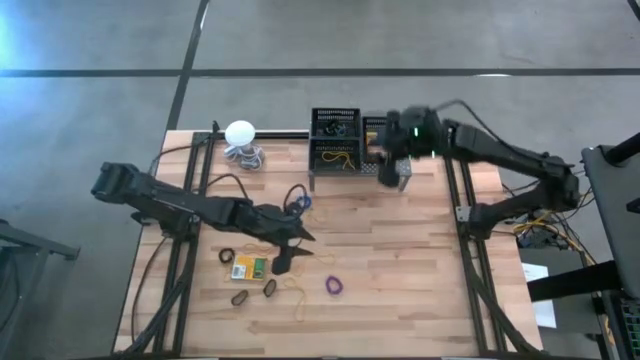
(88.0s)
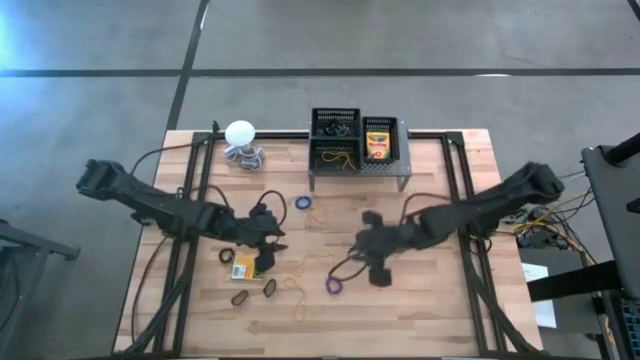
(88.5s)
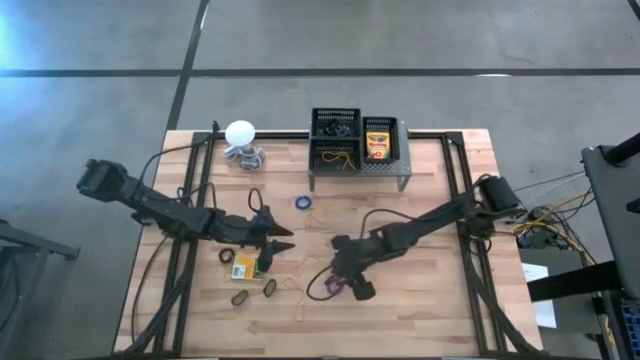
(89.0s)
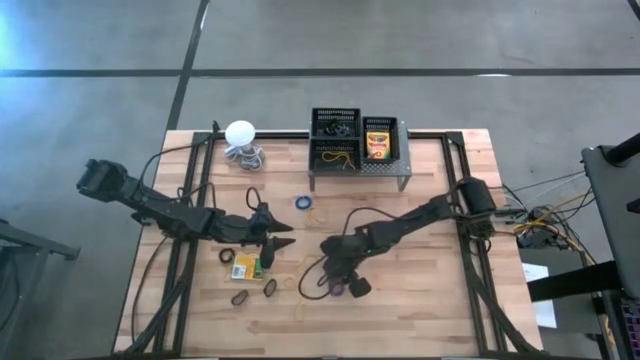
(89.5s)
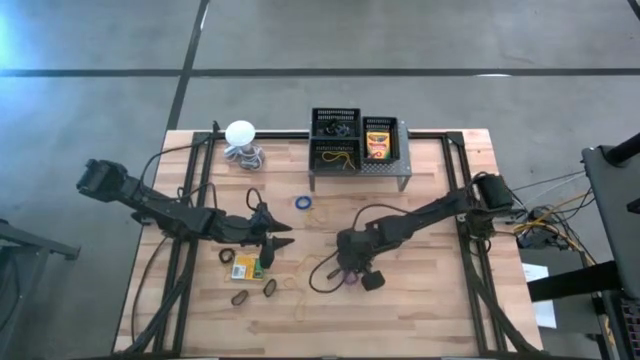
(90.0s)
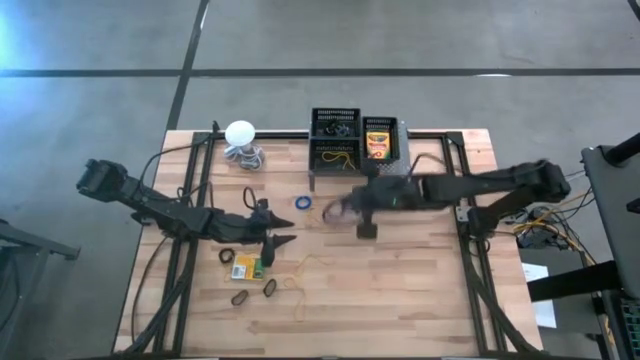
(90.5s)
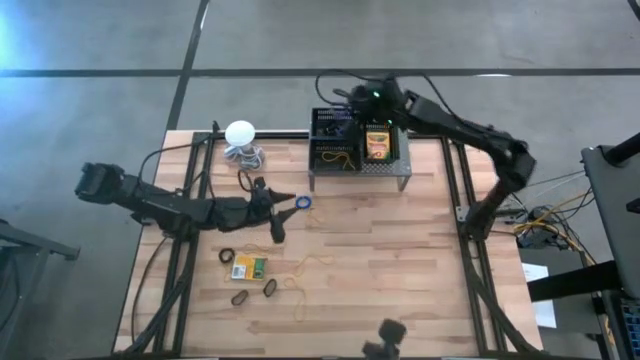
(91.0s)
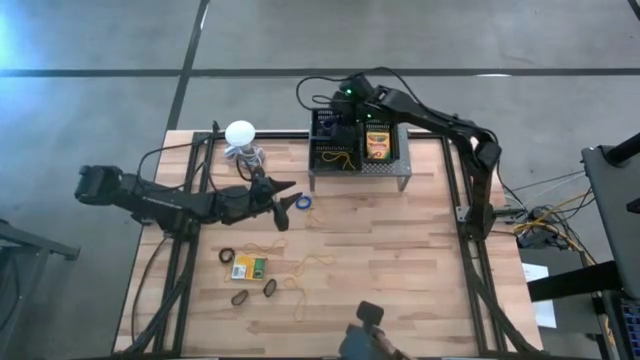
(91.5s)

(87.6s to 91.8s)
Task: Pick & Place Office Desk Supplies
Put the purple spring keychain into the top left black bin

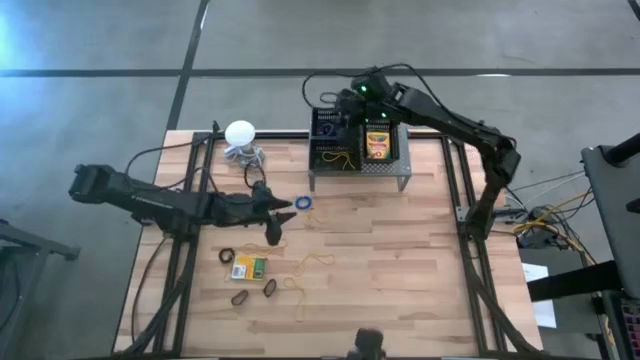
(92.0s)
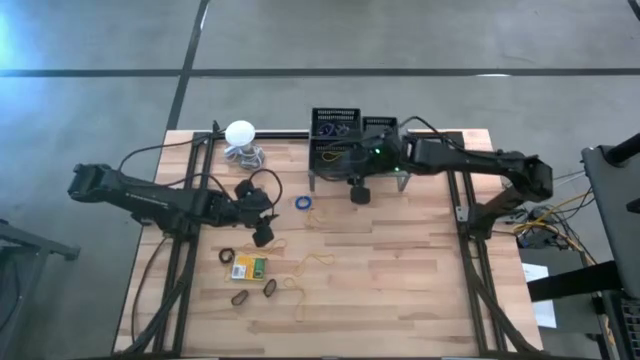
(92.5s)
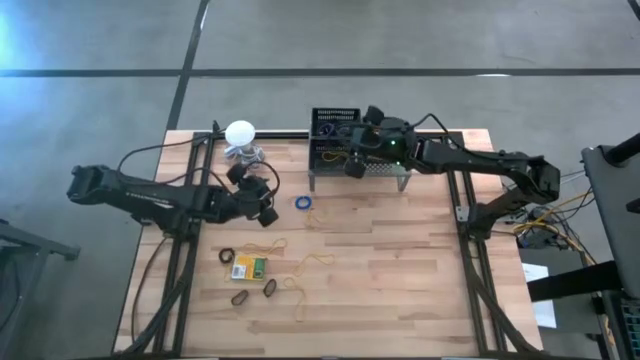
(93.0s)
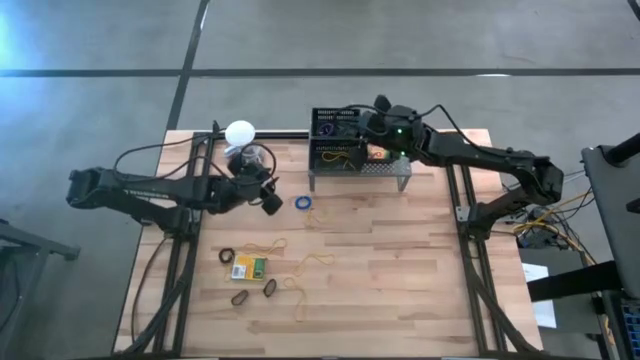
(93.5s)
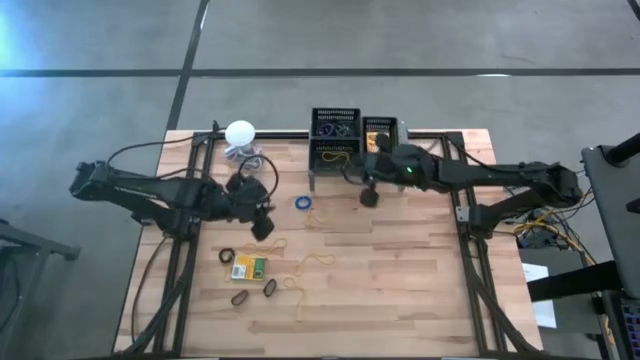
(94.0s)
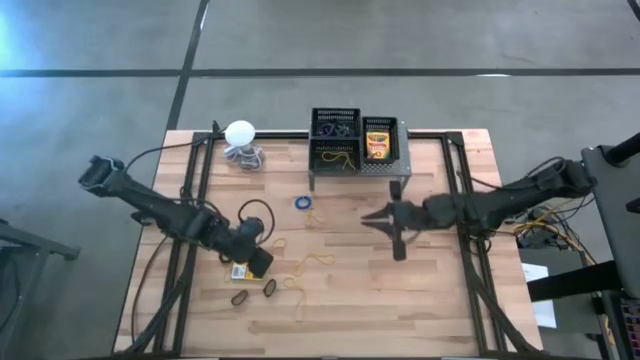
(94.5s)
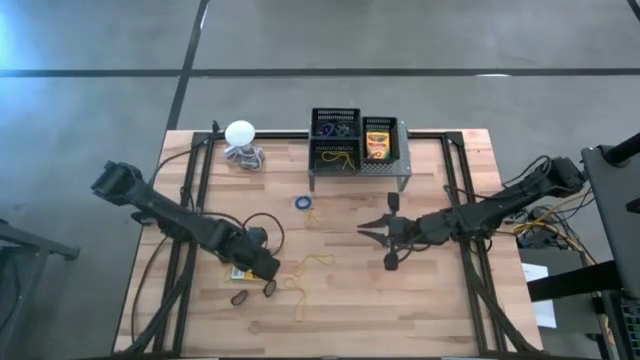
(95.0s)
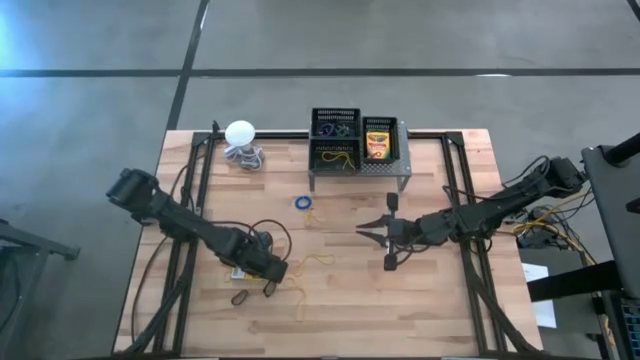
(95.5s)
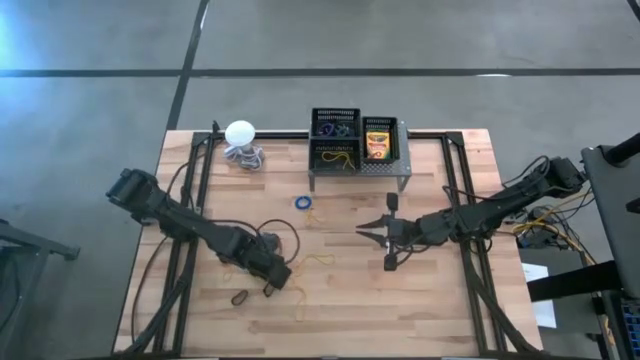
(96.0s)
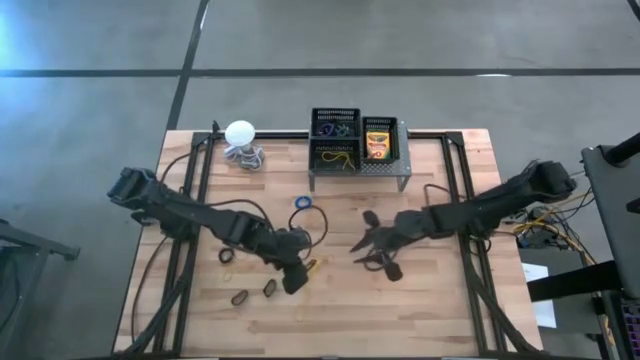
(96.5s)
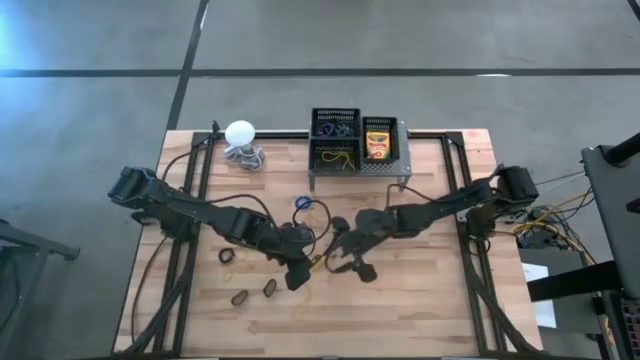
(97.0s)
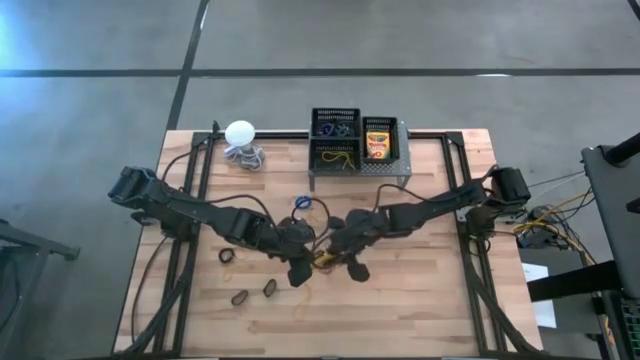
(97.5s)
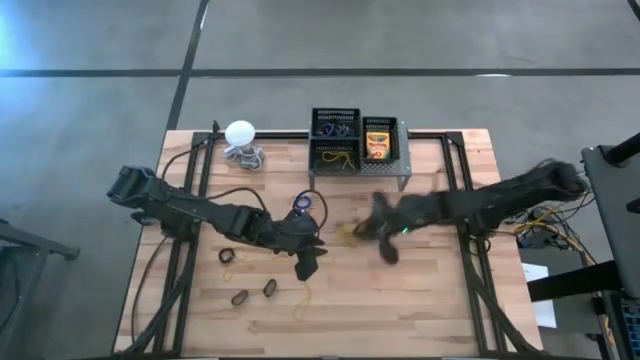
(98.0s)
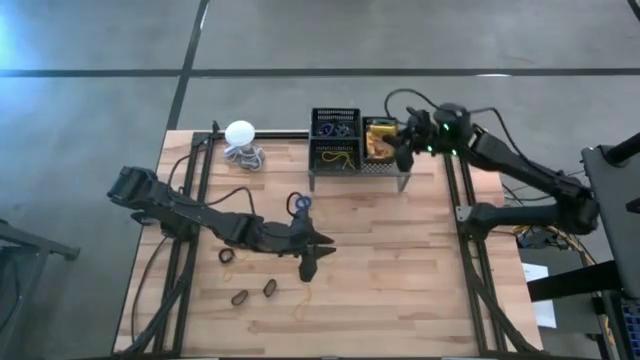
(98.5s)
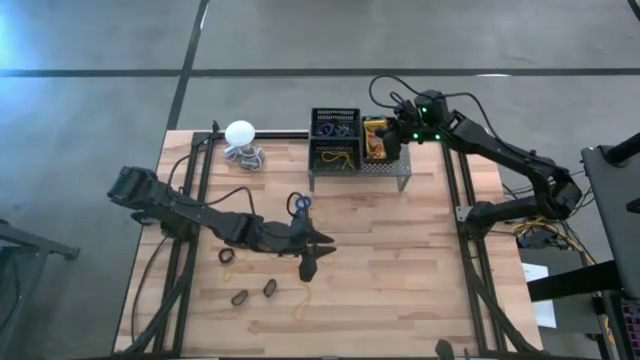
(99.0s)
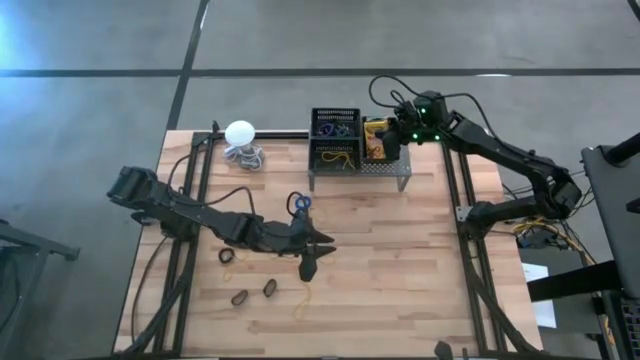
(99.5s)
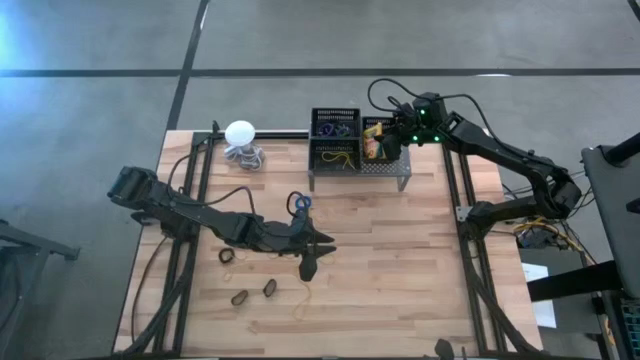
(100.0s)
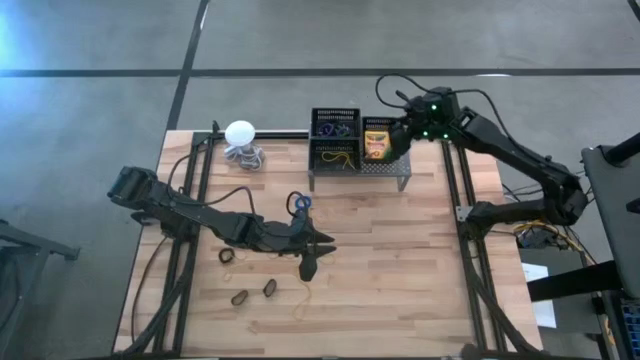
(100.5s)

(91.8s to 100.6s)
Put the yellow crayon box into the right black bin

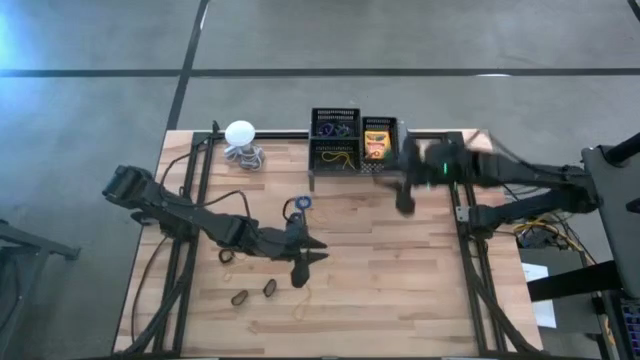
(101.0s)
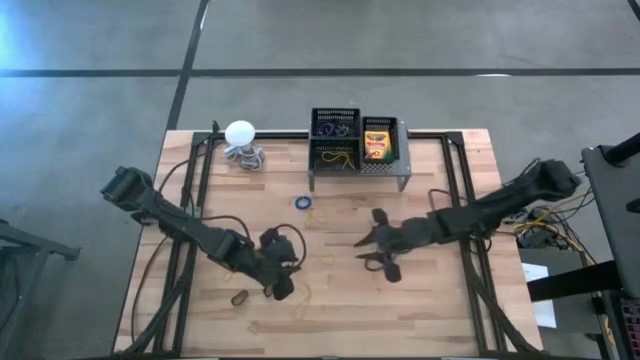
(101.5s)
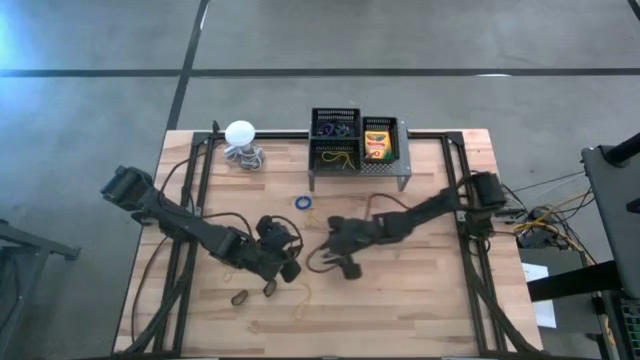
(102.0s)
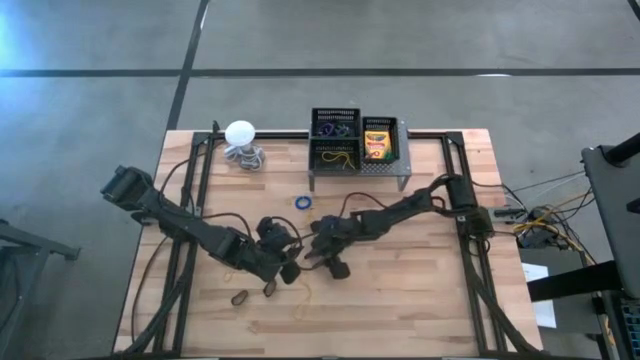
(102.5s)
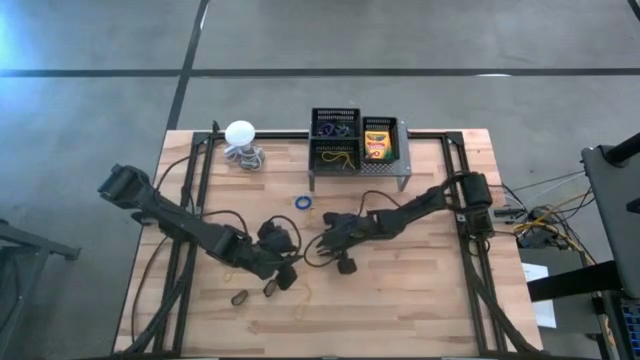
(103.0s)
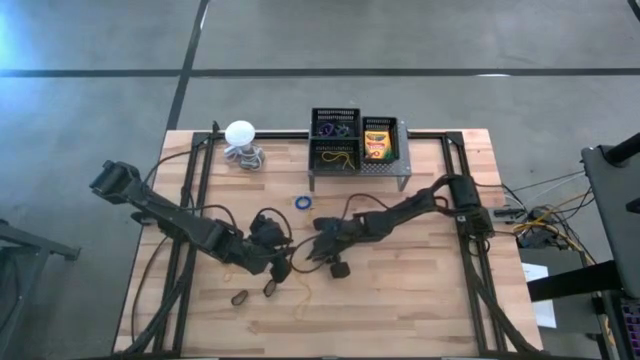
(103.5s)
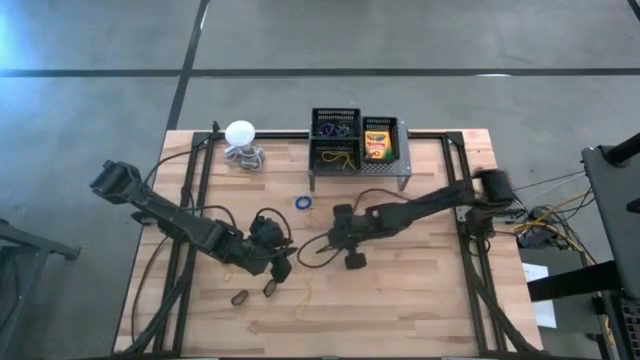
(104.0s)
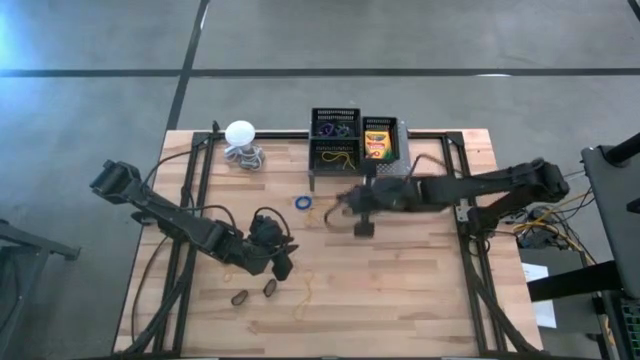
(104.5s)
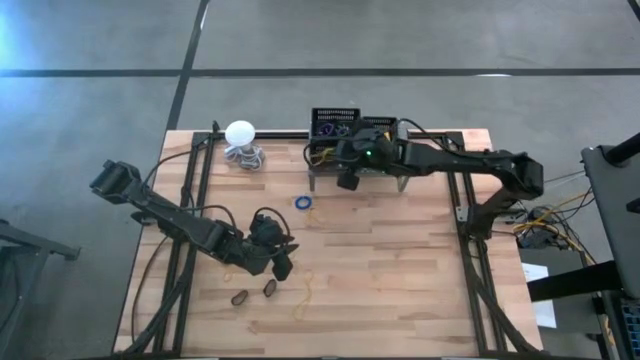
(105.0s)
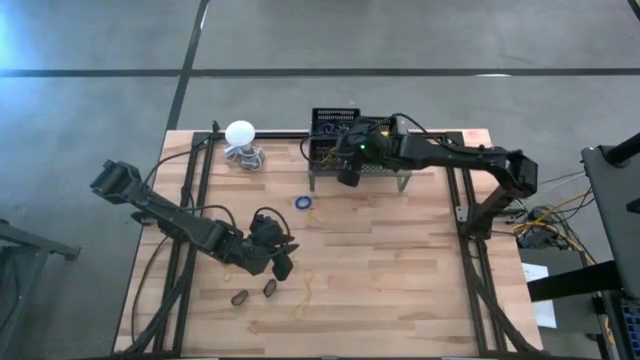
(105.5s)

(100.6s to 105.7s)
Put the yellow rubber band into the bottom left black bin

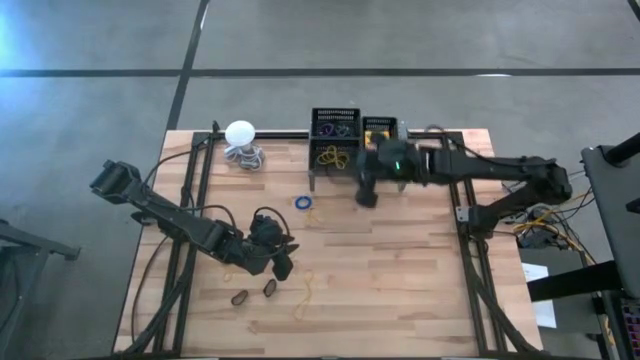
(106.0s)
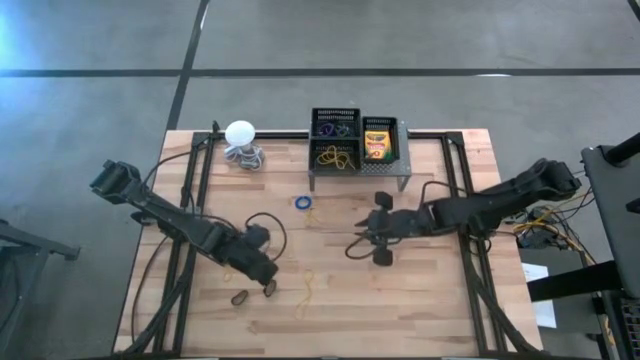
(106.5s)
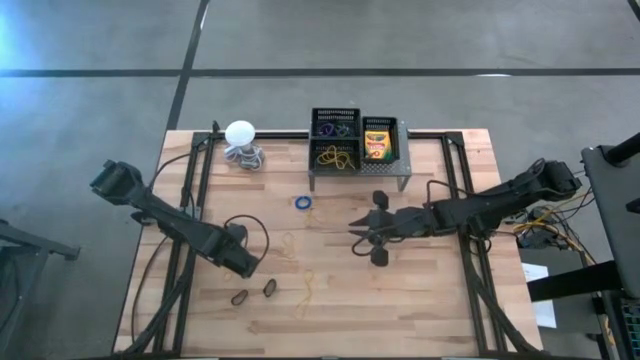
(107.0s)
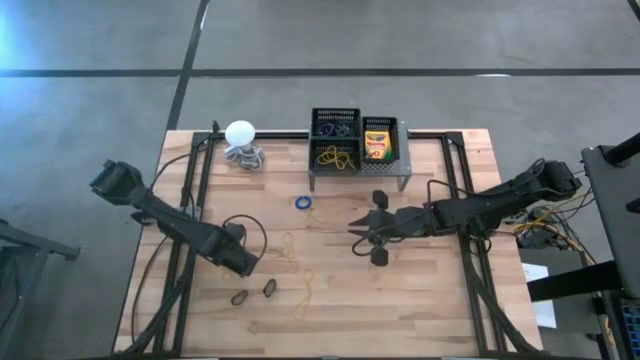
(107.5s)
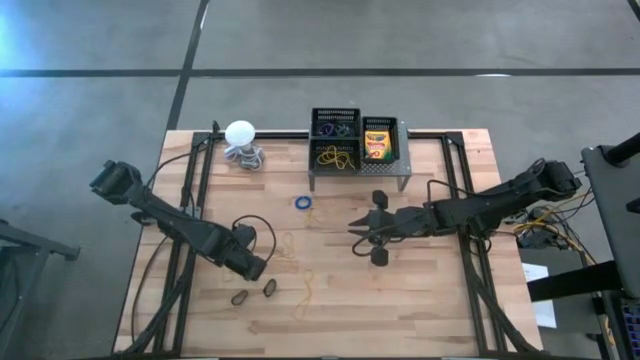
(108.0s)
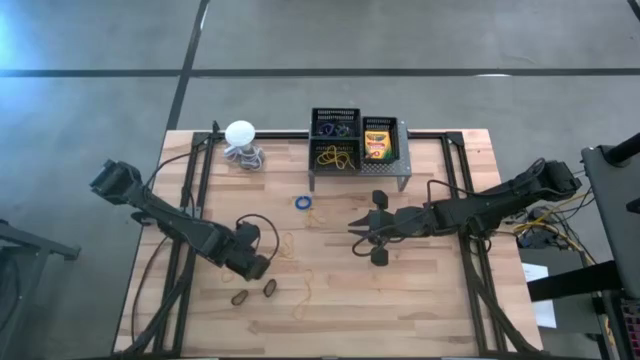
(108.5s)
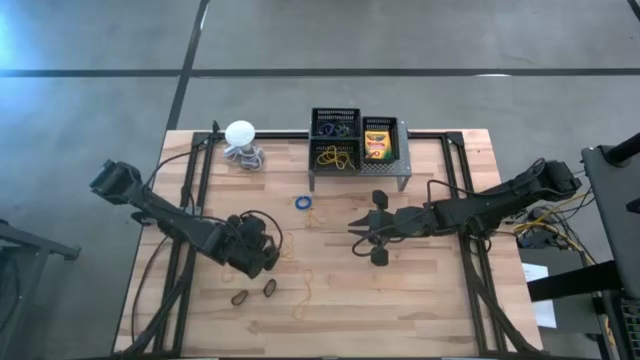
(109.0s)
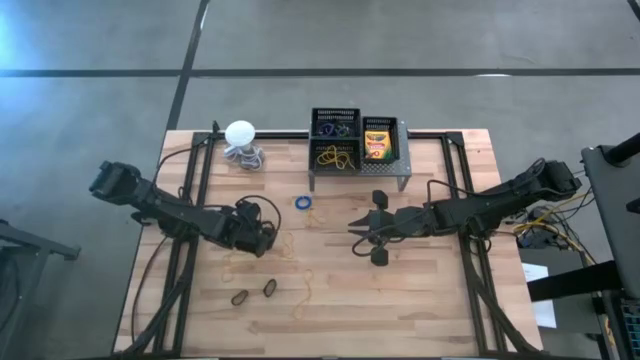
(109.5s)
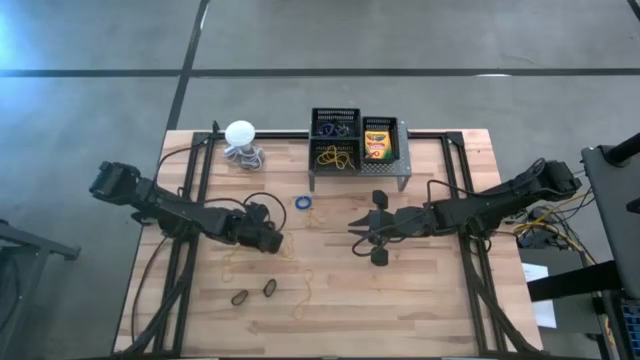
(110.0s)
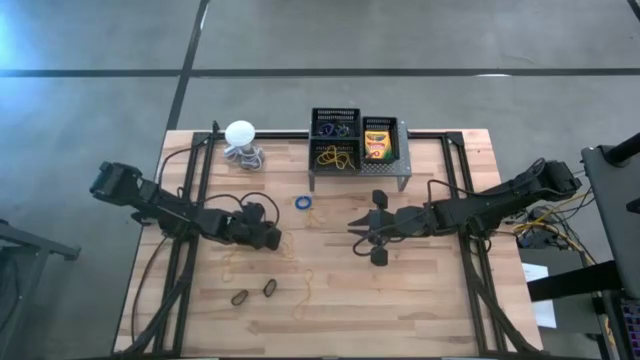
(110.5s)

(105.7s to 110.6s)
Put the black spring keychain into the top left black bin
